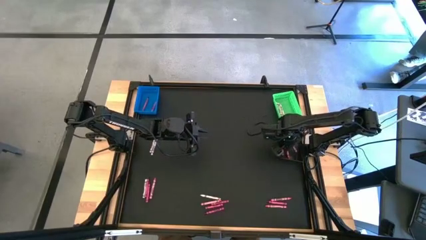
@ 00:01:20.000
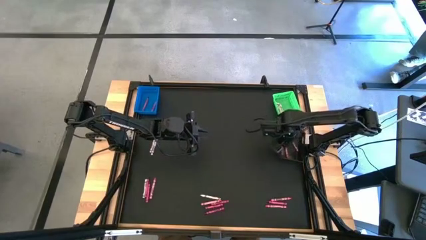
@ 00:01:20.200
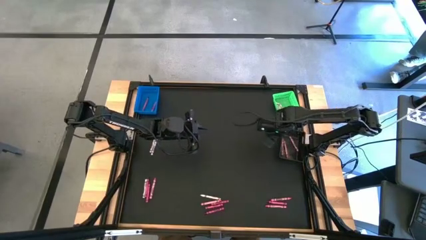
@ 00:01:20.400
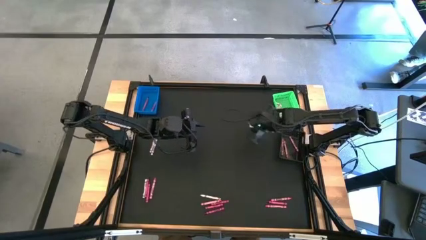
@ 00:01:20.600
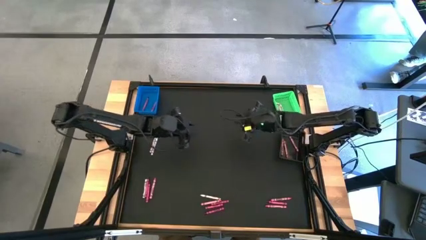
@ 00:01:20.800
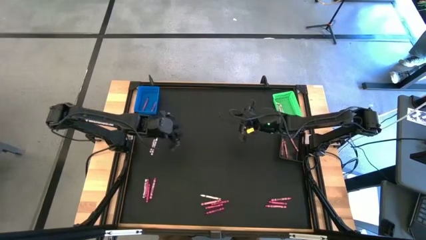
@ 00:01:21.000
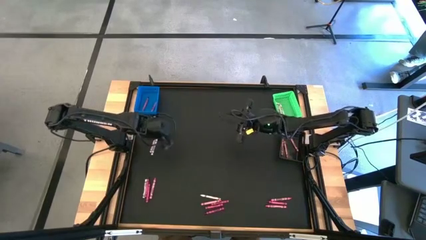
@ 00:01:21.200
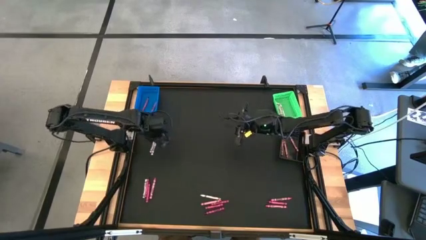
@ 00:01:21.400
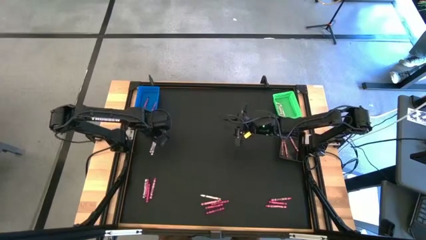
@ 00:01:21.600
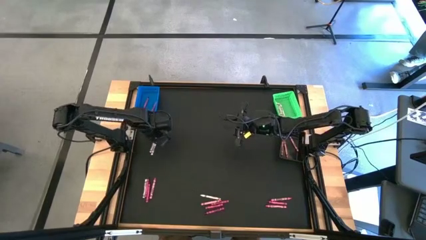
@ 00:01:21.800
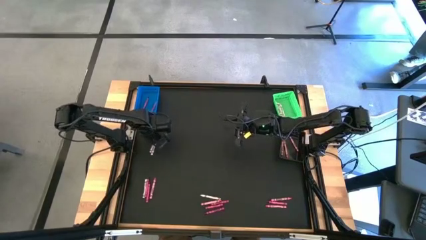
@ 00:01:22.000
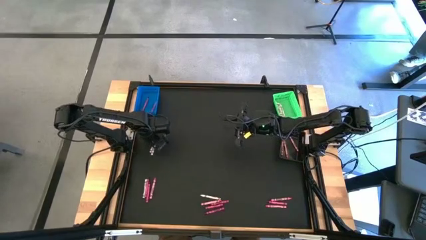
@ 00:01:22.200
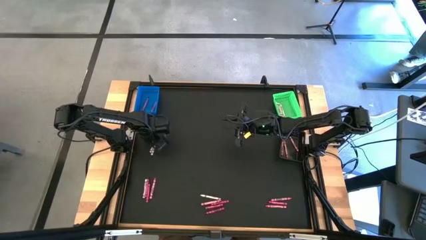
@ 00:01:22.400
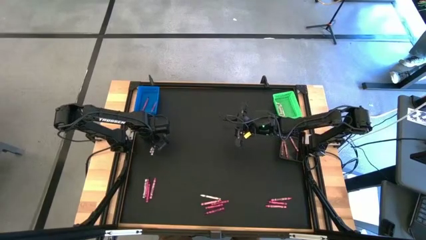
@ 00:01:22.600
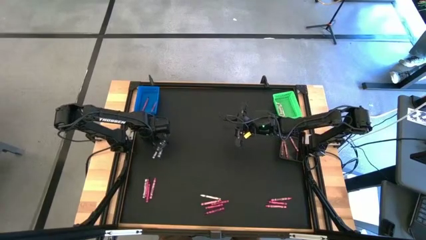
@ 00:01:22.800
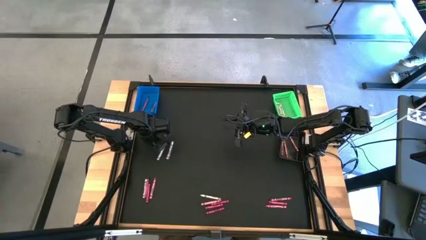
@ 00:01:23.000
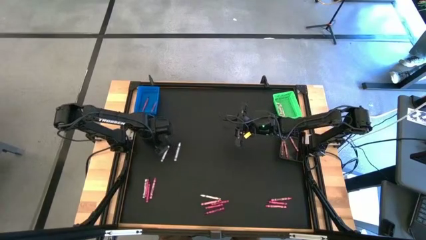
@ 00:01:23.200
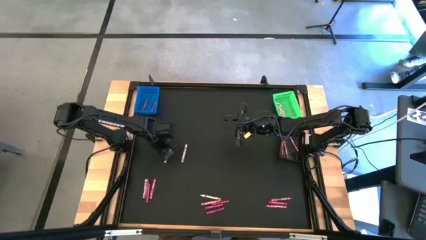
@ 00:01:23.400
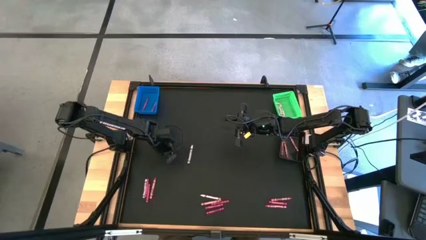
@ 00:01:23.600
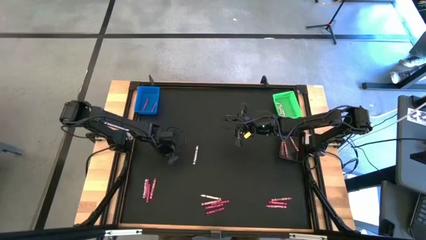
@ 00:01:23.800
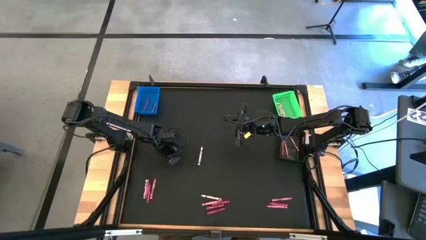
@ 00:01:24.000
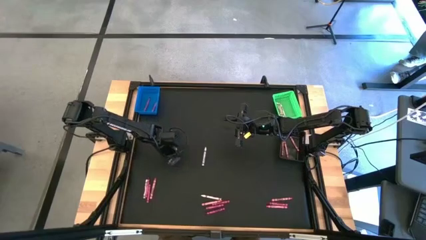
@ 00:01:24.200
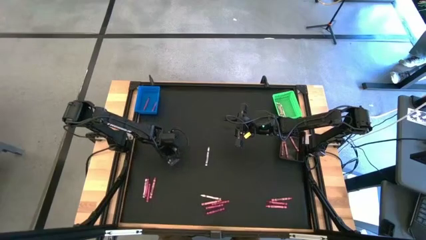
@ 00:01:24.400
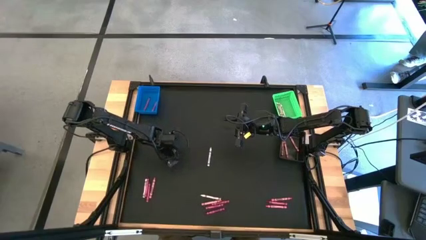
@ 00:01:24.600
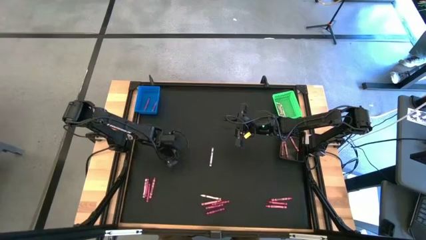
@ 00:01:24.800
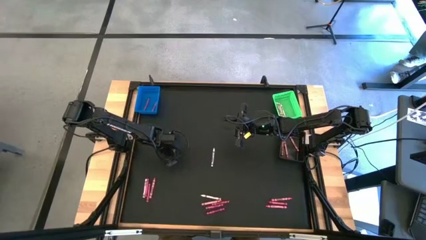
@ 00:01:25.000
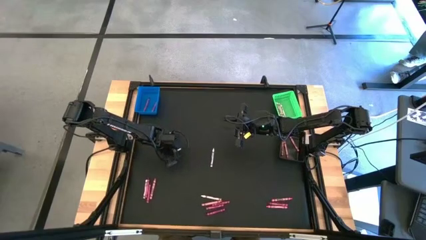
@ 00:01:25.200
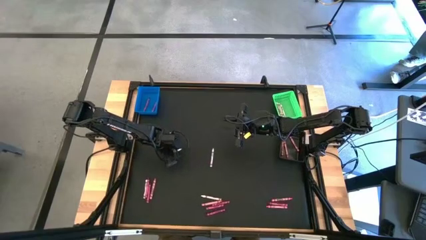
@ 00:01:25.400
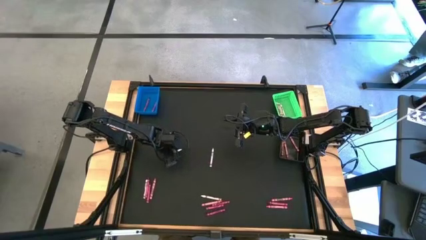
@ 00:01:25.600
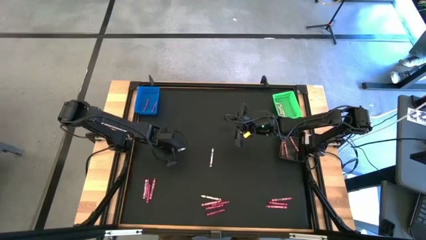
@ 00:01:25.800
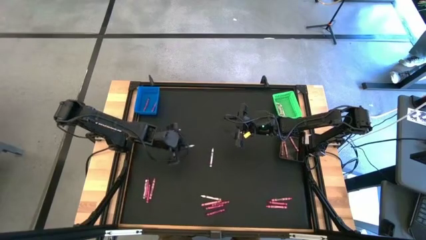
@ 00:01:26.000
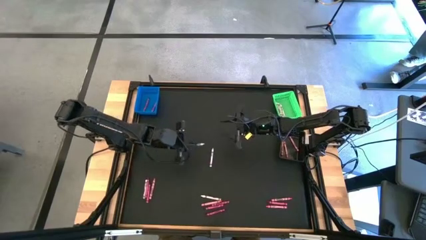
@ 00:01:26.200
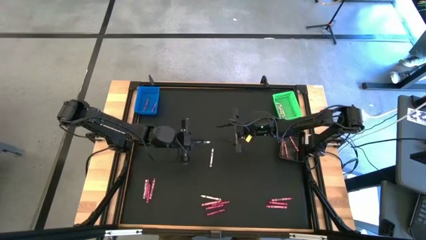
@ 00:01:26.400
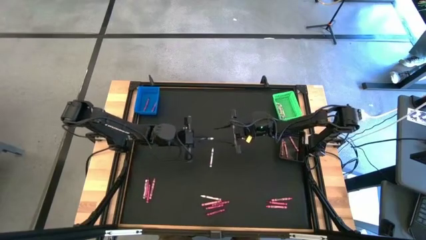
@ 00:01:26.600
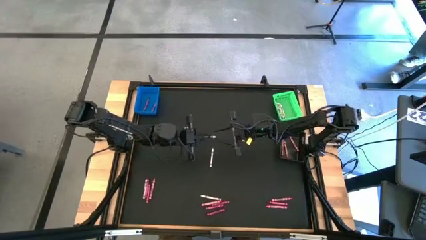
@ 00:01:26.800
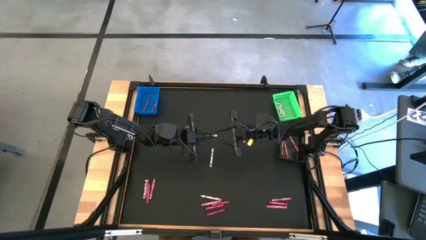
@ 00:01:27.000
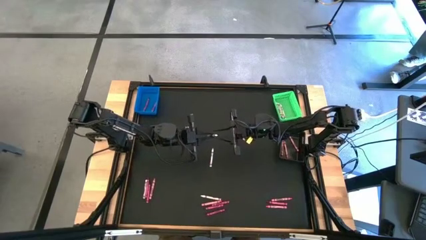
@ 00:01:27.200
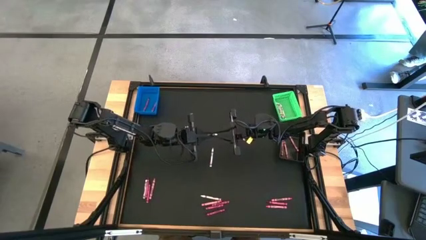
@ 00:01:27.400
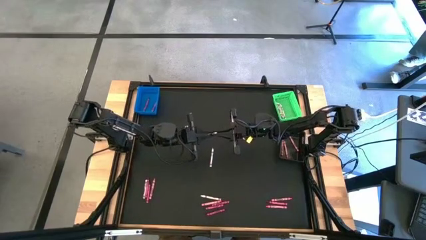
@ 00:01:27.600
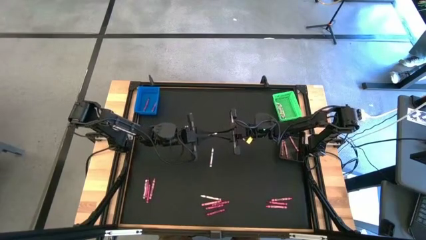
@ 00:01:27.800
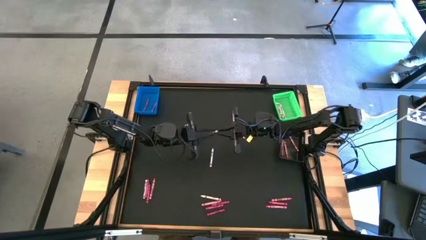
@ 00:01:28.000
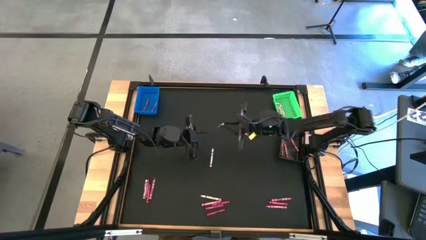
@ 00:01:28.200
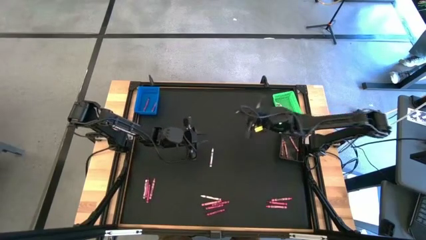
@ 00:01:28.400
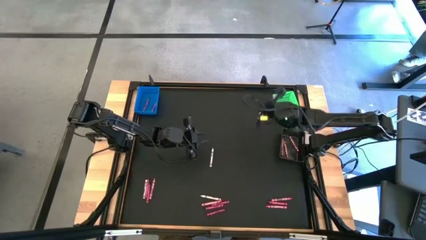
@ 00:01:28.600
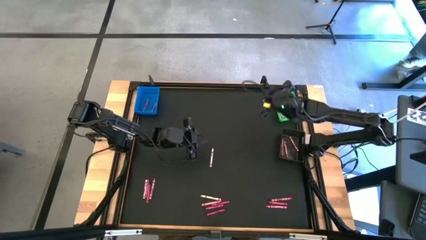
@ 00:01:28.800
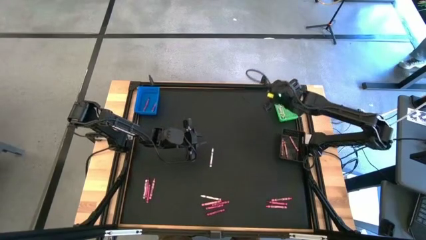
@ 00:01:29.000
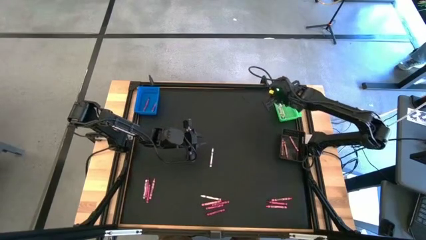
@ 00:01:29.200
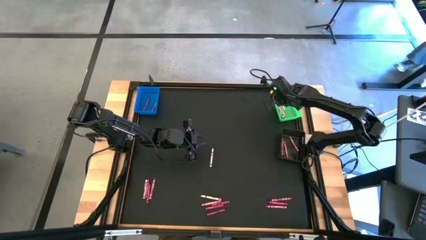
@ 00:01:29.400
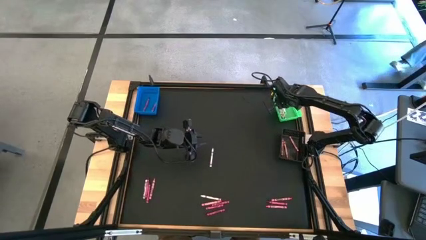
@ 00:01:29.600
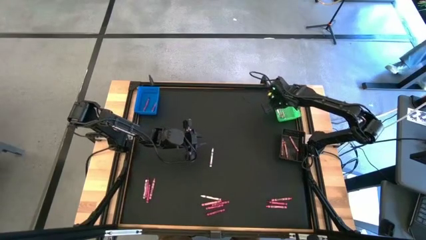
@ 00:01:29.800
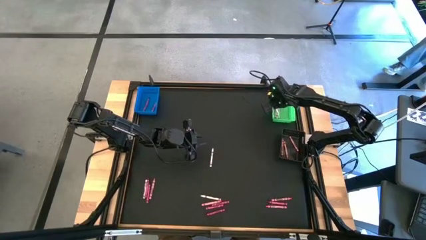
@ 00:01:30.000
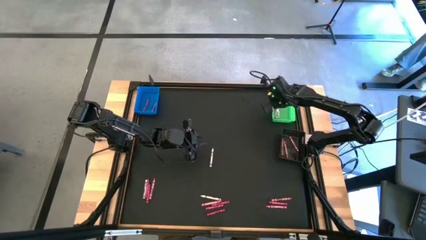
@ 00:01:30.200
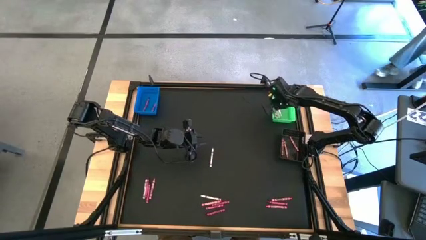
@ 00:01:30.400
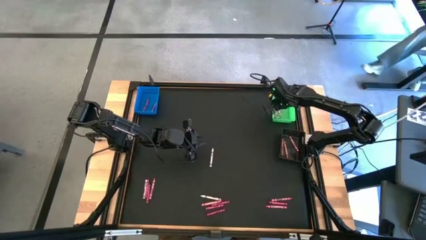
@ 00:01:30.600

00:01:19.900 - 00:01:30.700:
Task: Sort crayons
Put the white crayon into the green bin

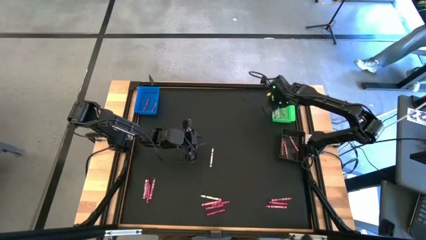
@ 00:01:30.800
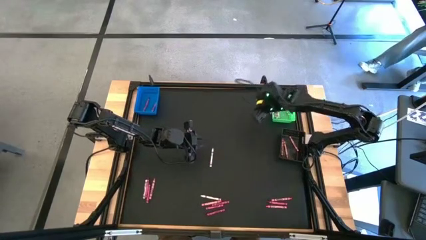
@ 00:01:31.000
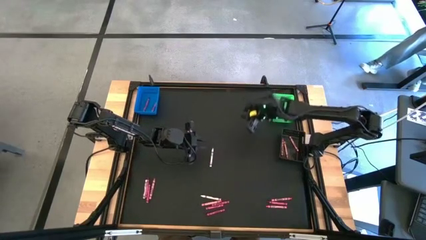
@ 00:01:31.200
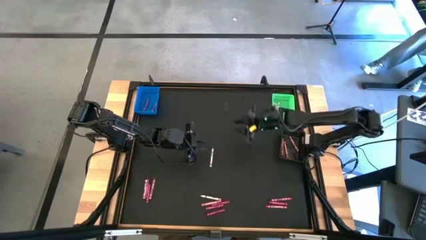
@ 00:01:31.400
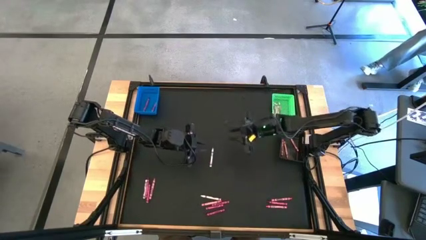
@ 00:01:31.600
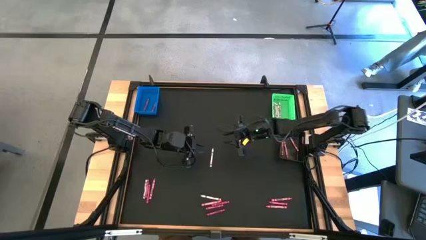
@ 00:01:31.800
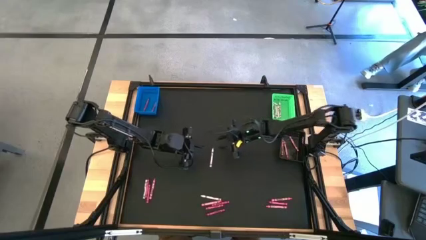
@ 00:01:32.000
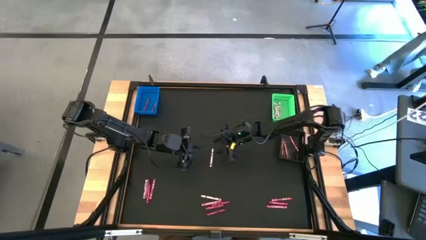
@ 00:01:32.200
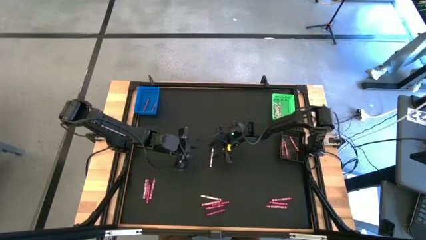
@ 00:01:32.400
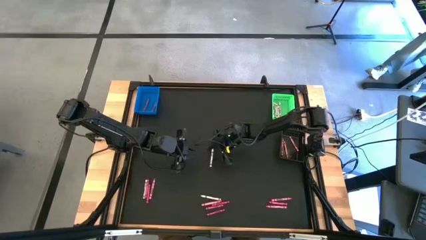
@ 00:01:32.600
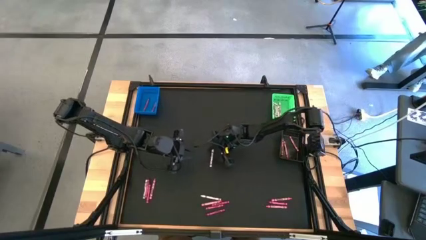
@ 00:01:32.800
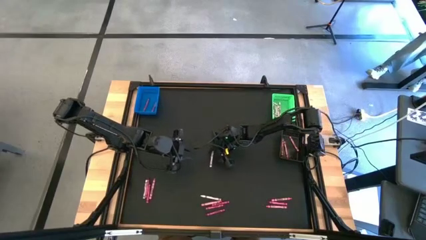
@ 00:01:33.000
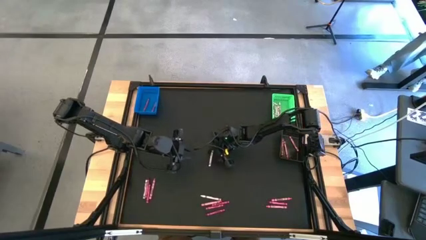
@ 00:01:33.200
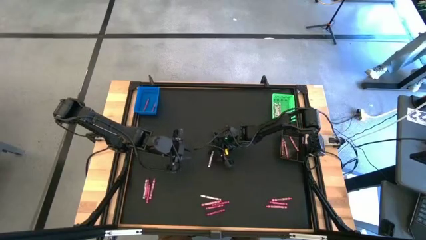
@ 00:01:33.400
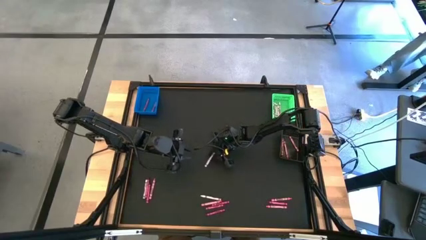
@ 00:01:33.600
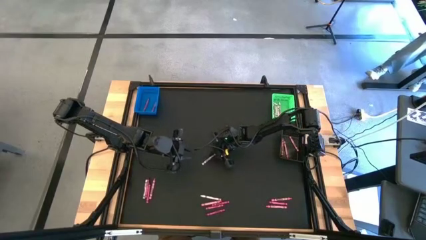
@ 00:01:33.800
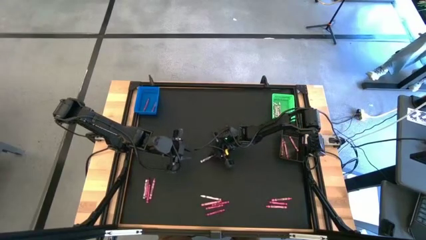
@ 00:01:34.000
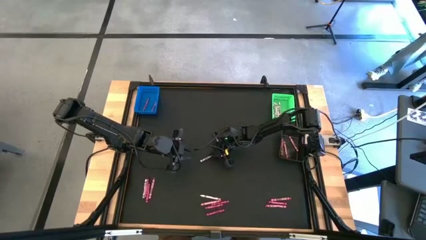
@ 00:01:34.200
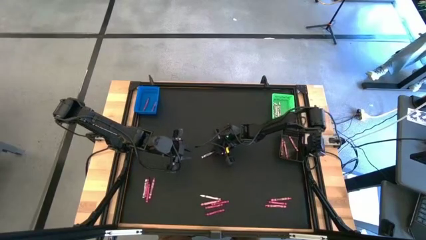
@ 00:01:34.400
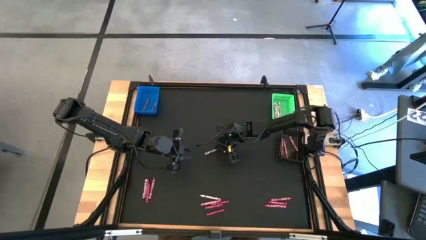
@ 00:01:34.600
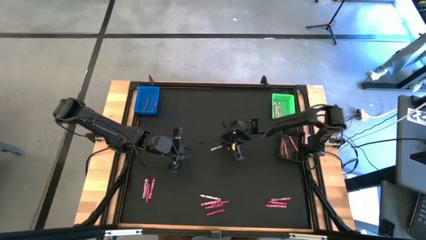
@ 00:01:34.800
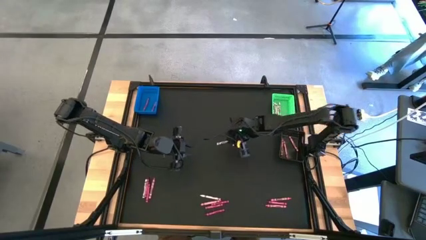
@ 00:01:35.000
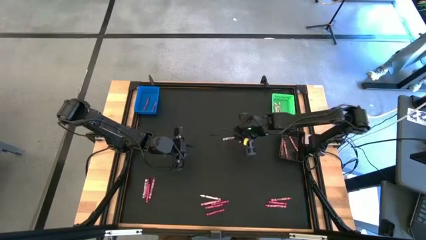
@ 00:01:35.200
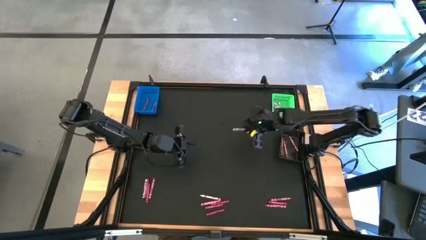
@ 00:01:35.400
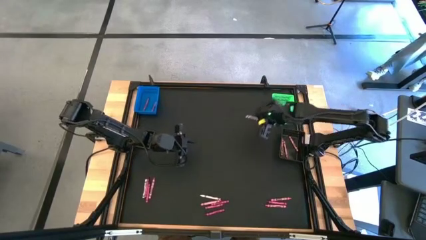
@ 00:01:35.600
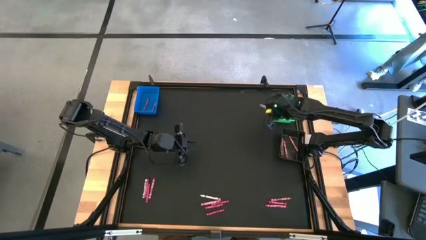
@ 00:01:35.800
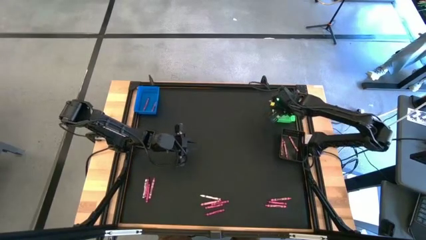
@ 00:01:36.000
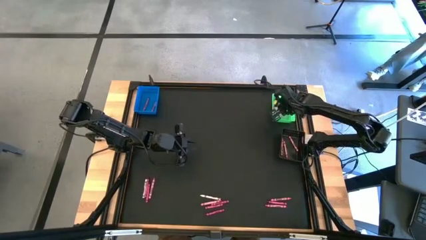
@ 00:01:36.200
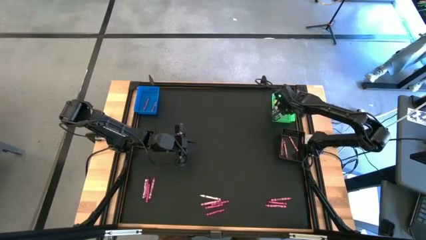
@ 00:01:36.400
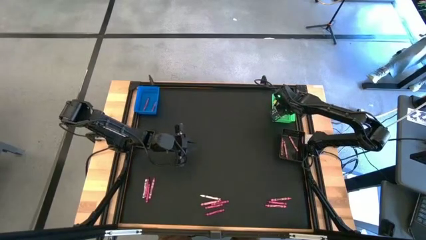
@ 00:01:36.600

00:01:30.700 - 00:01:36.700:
Put the white crayon into the green bin

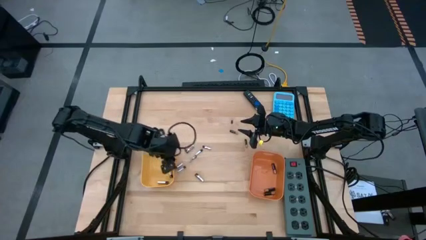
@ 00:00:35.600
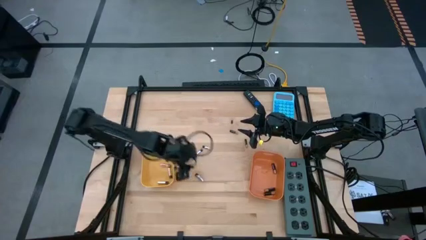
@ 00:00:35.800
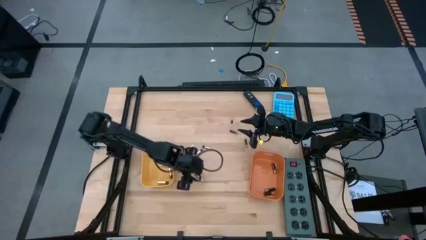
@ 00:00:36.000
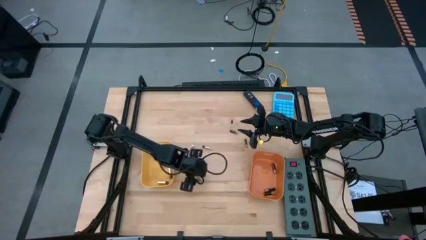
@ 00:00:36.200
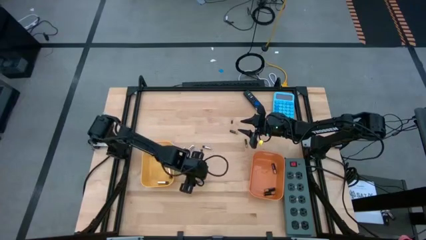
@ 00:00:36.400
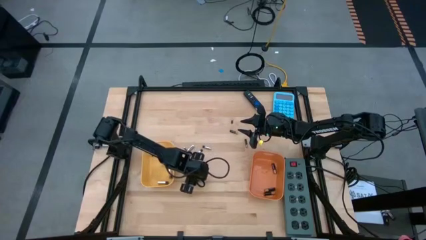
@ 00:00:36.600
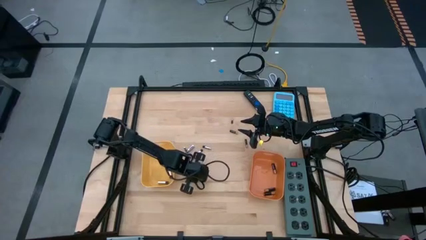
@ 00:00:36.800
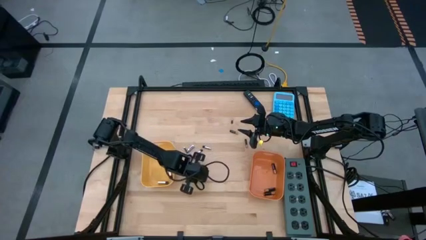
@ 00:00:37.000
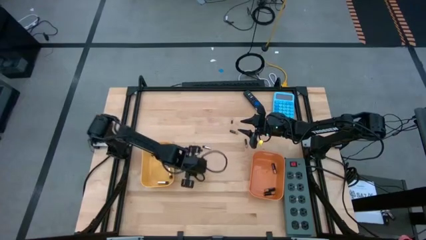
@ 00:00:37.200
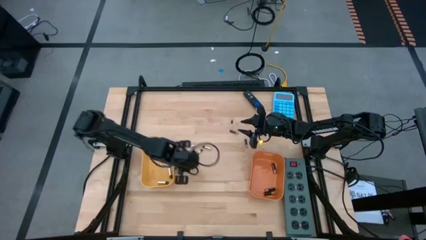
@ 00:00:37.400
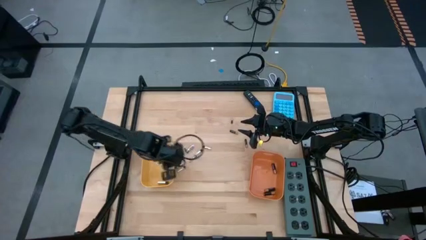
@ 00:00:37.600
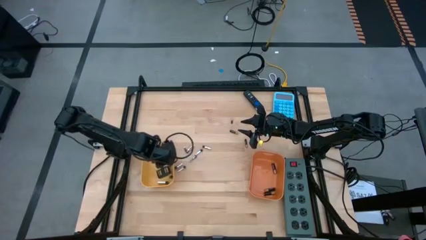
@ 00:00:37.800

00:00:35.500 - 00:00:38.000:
Task: Sort batteries
Put the silver battery into the yellow bin
